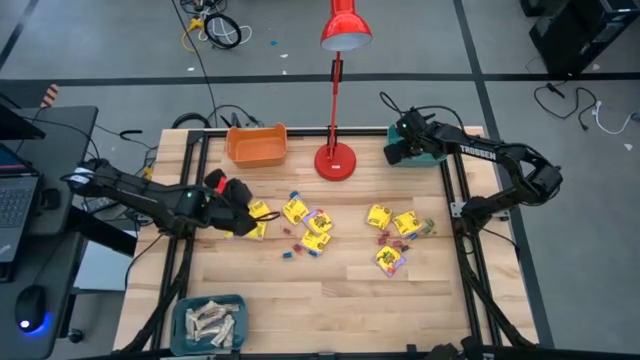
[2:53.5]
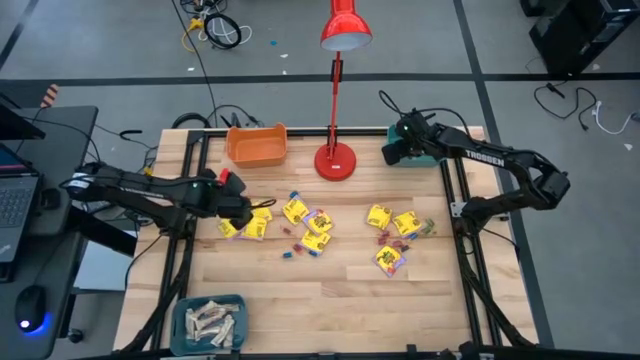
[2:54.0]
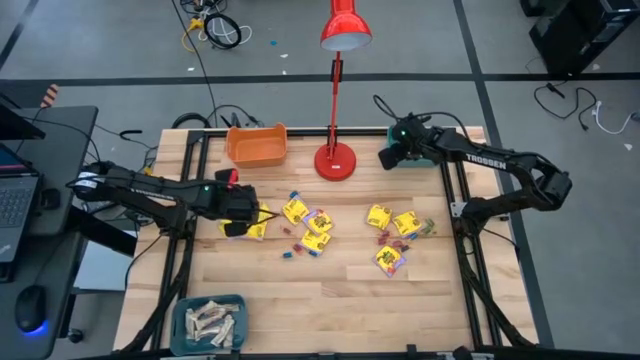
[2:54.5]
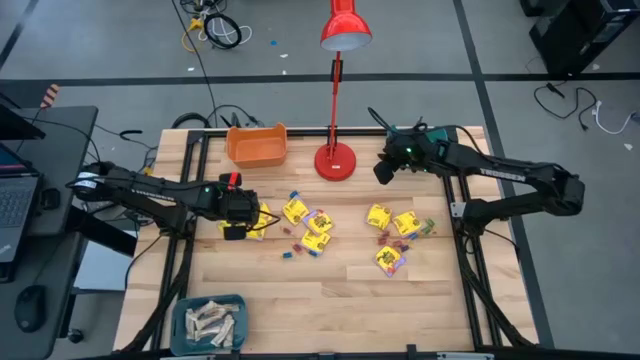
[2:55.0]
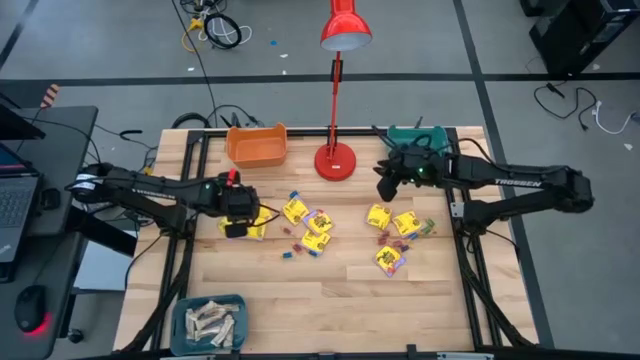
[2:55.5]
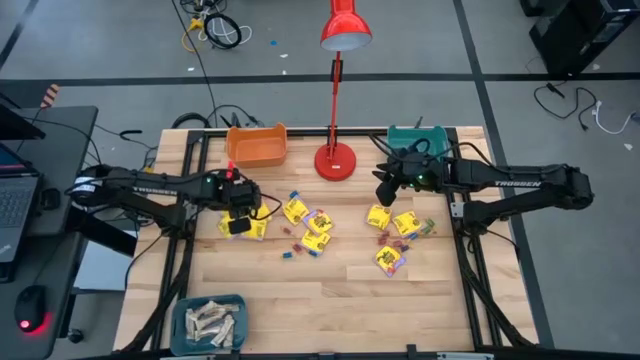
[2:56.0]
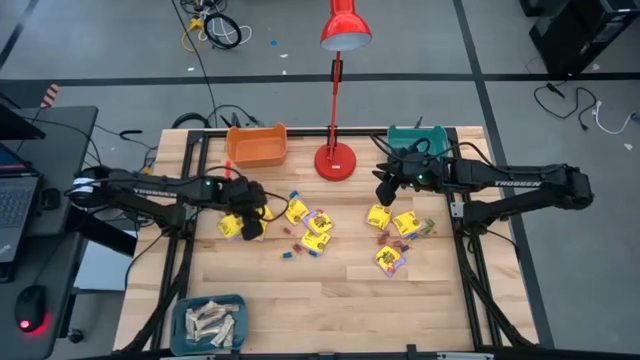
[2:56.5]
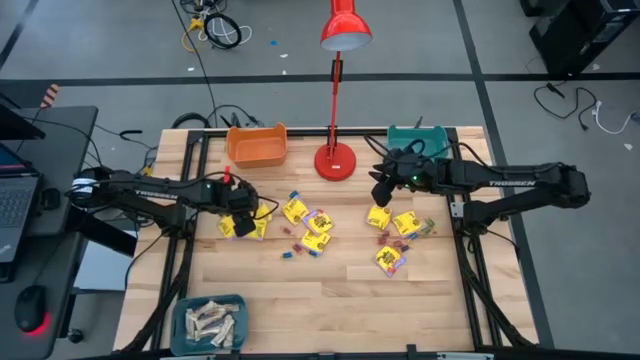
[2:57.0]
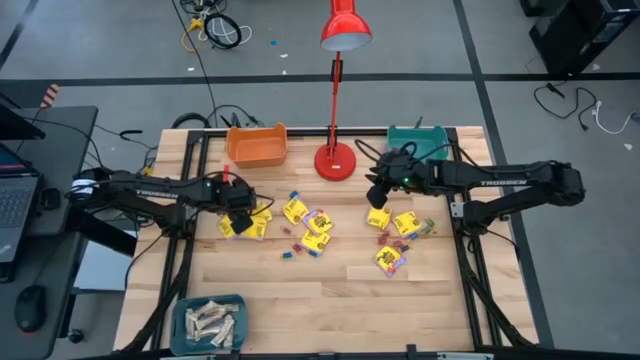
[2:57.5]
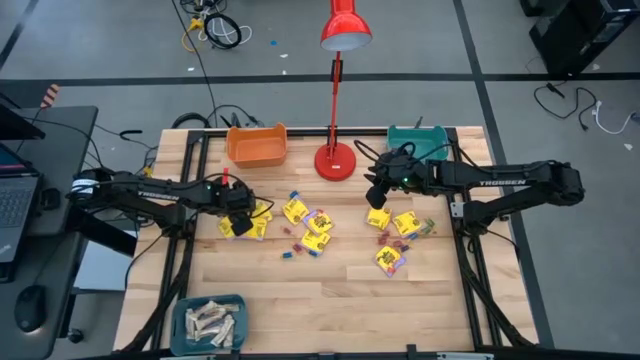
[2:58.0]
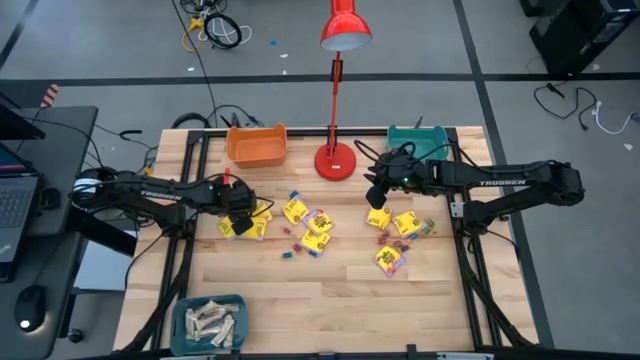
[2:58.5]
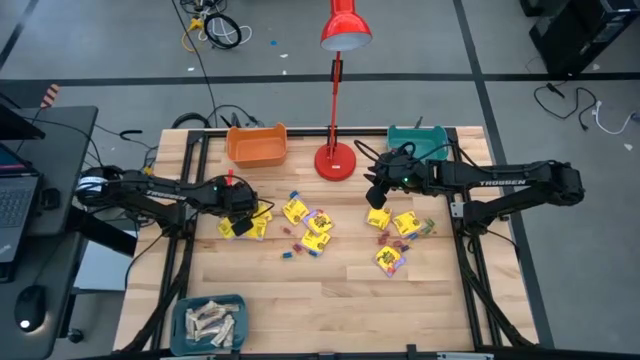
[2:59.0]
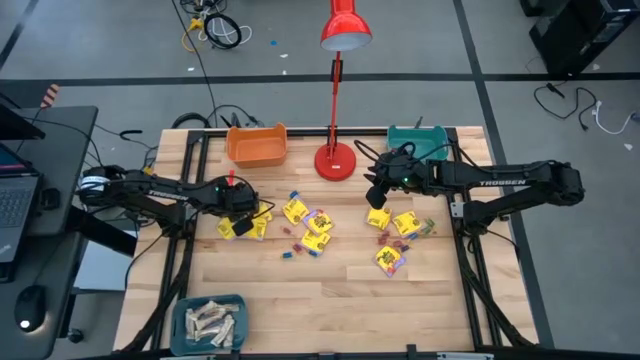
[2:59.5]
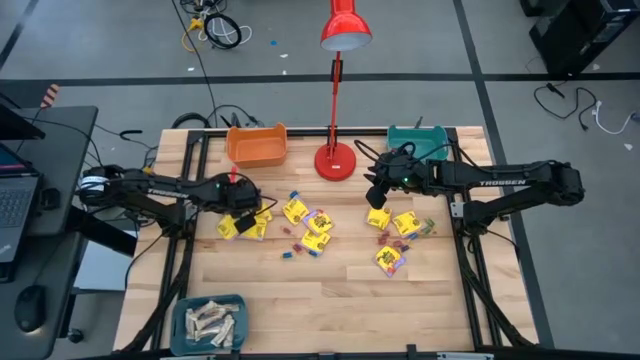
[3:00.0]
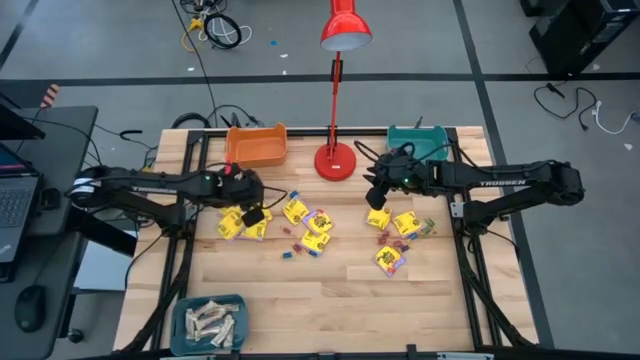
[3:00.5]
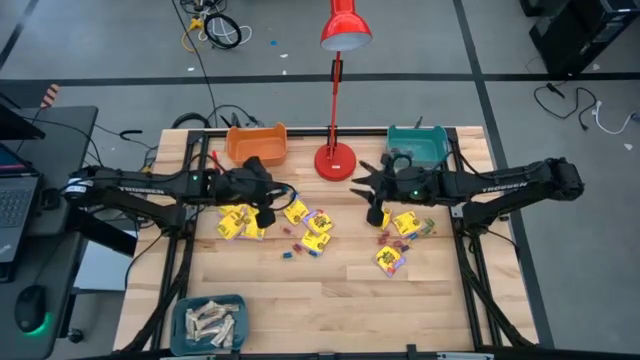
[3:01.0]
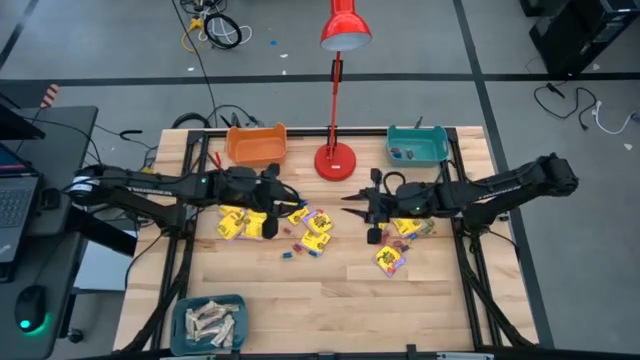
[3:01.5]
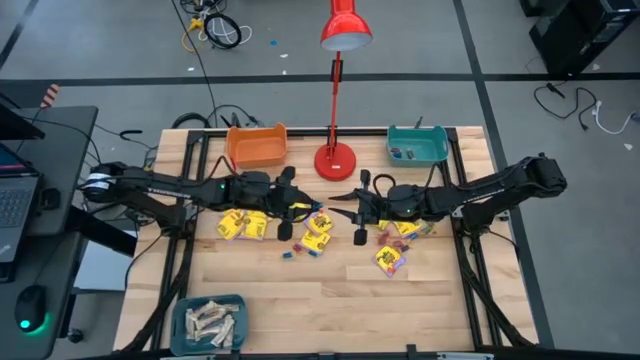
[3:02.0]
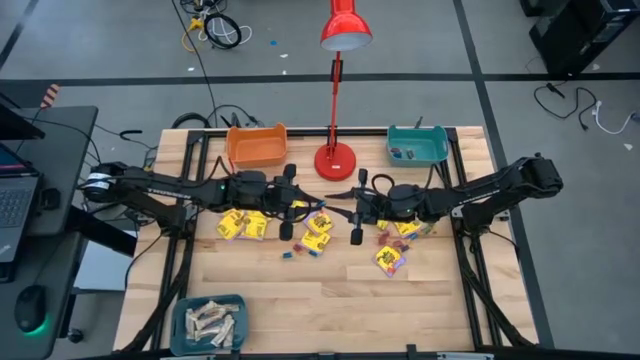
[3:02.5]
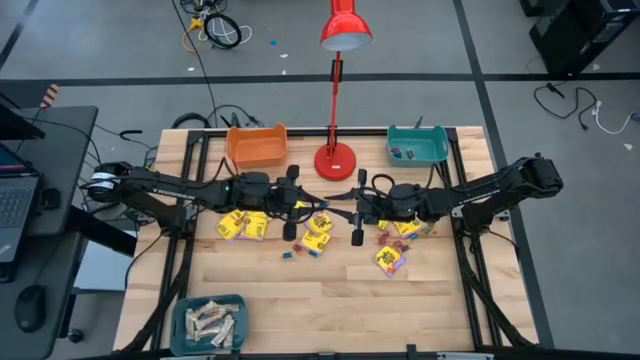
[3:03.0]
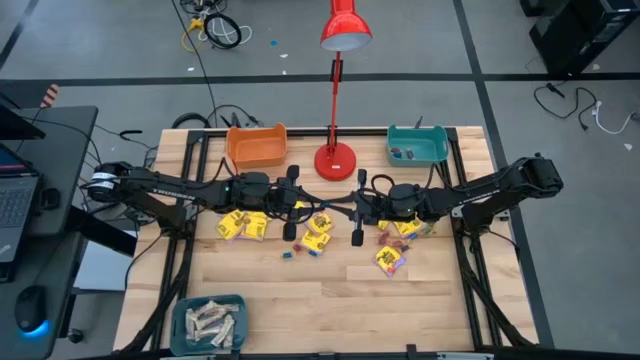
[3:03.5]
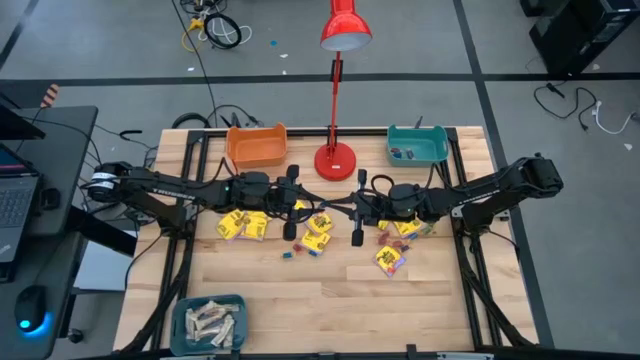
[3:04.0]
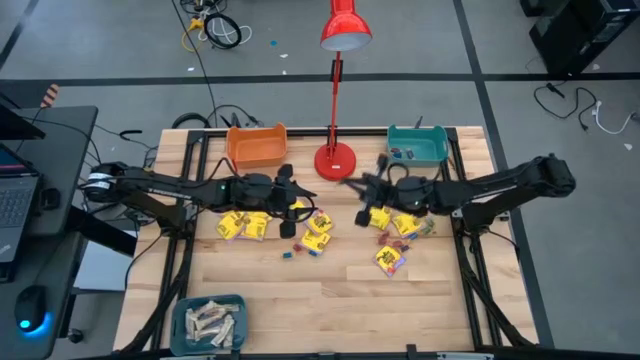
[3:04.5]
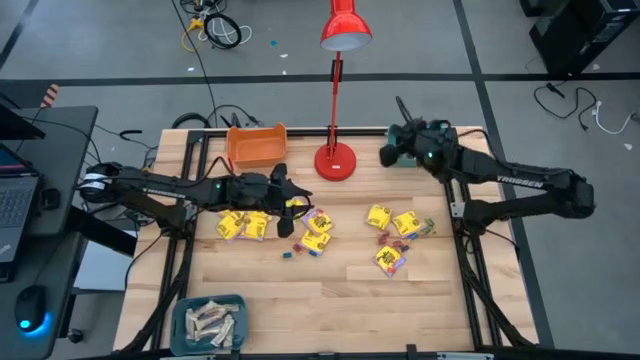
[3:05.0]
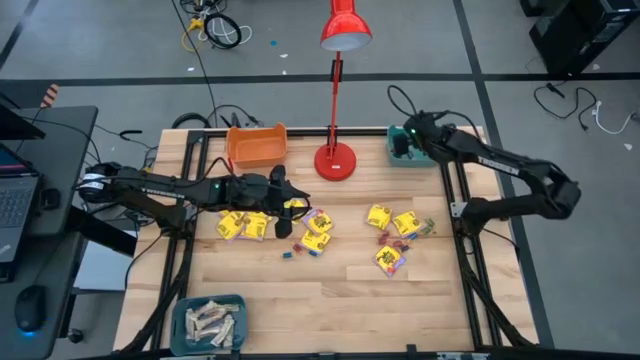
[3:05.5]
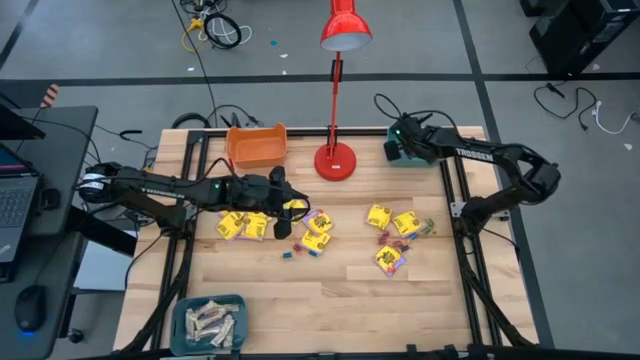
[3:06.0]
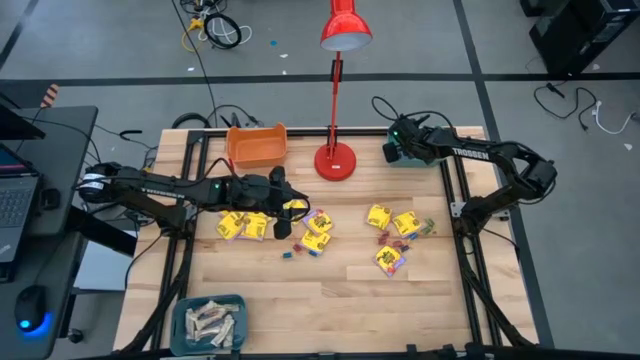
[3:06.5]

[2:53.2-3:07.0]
Task: Sort candy
Put the small blue candy into the green bin

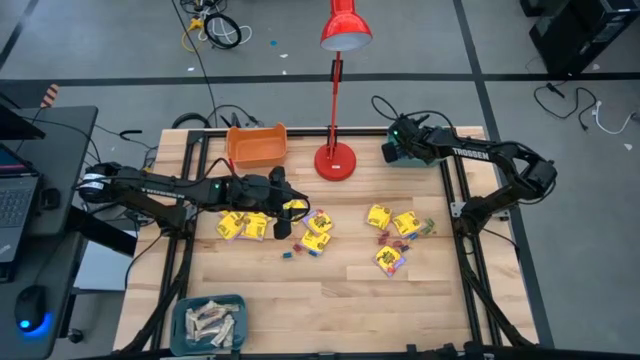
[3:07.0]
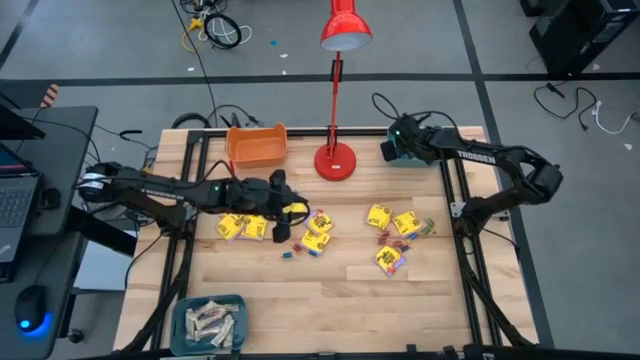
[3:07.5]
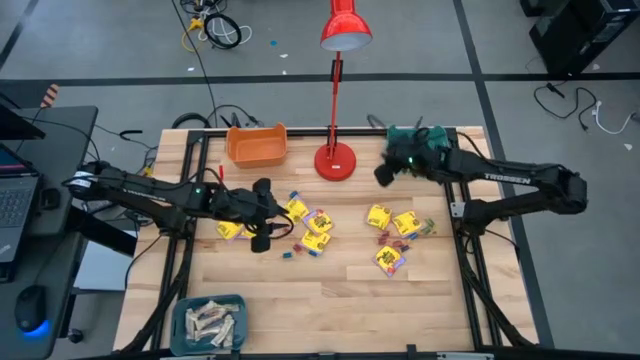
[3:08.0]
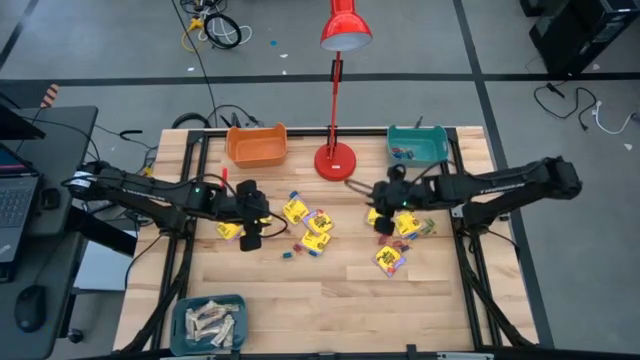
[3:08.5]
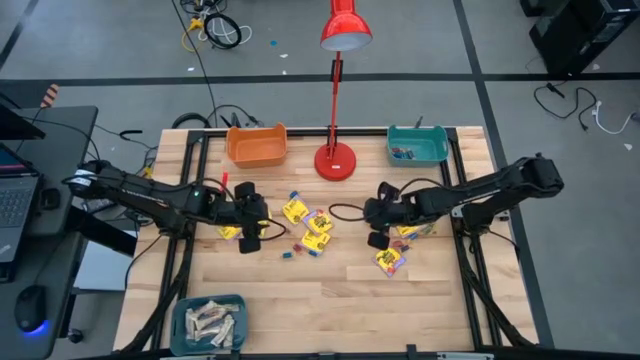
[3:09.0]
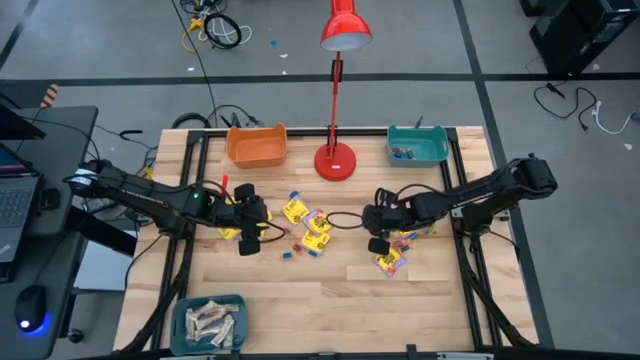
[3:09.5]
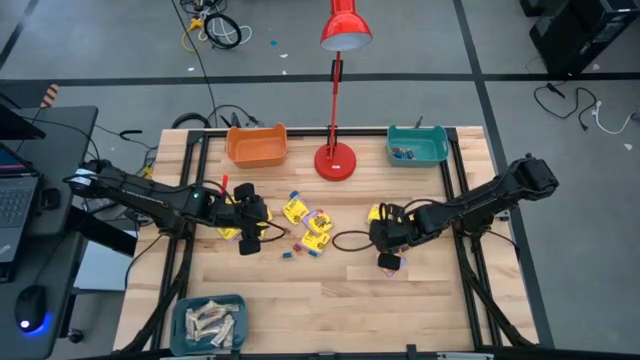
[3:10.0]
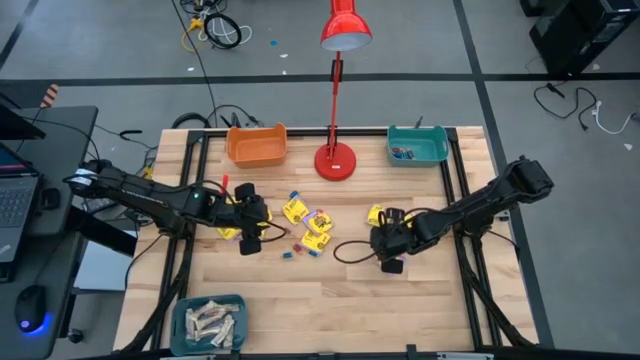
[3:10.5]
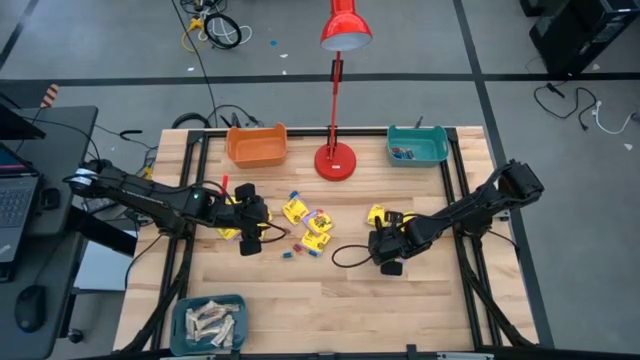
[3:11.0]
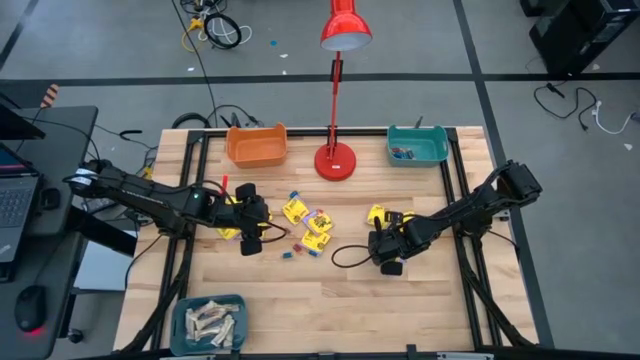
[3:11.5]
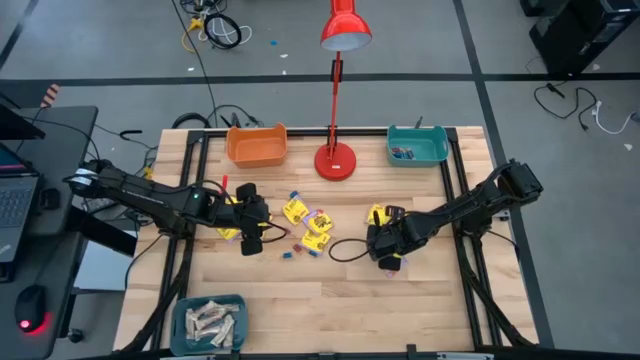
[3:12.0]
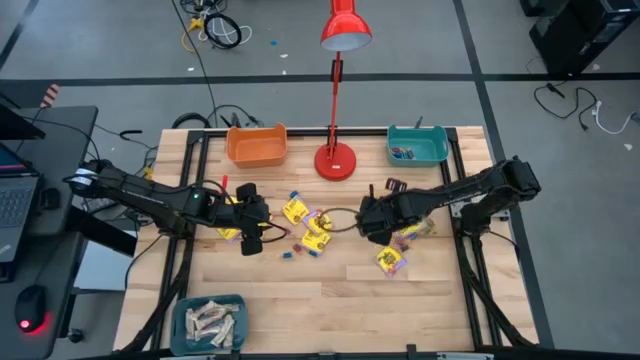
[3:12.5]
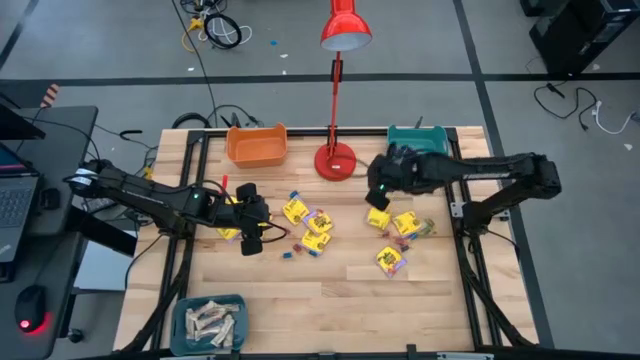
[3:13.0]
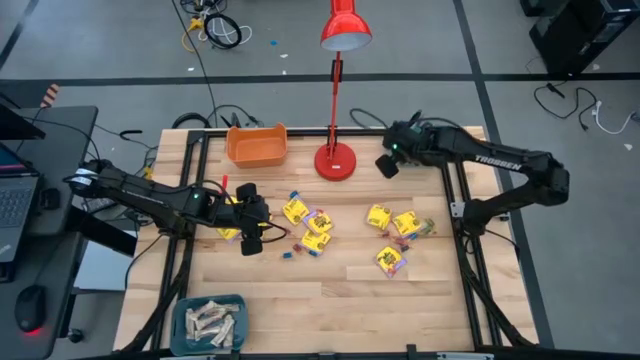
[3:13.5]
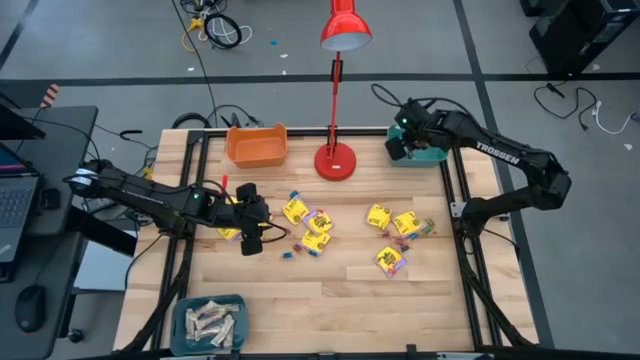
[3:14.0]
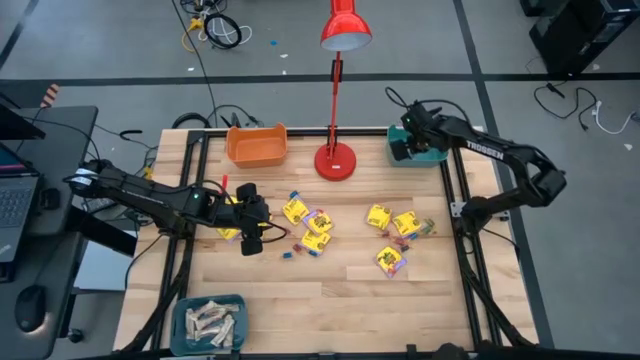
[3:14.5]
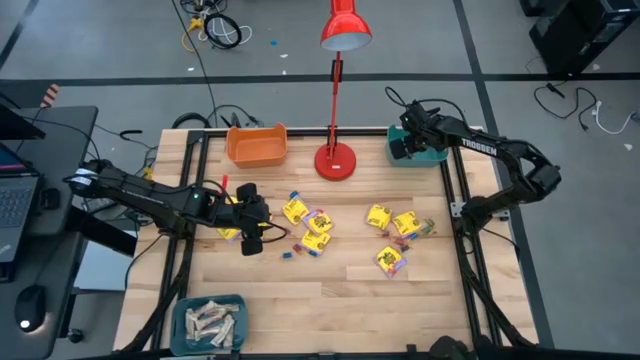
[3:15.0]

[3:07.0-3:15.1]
Put the small red candy into the green bin
